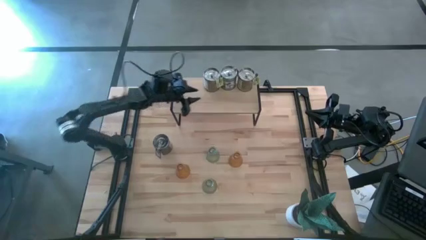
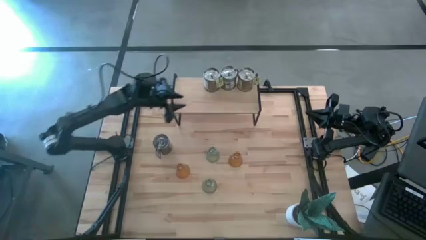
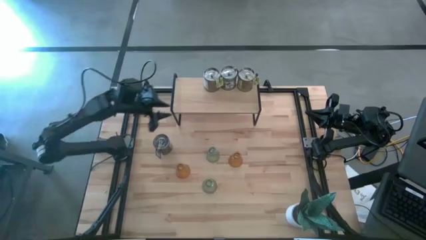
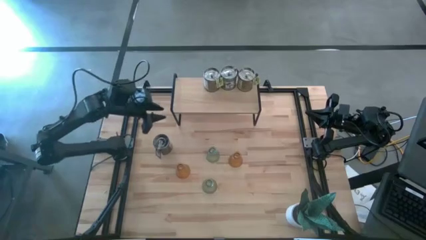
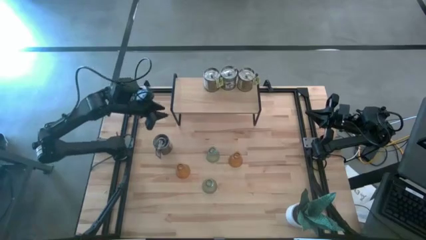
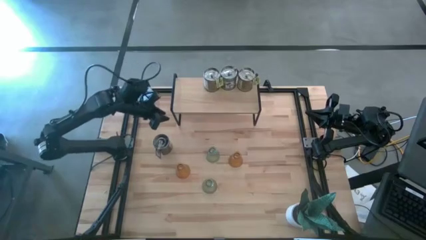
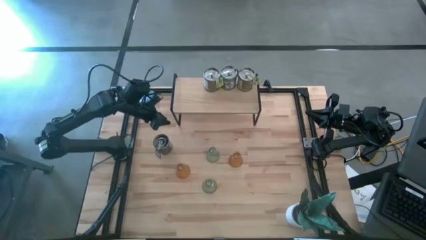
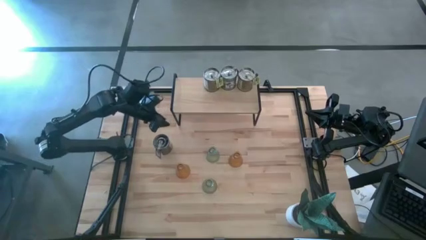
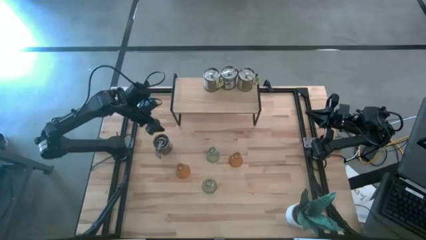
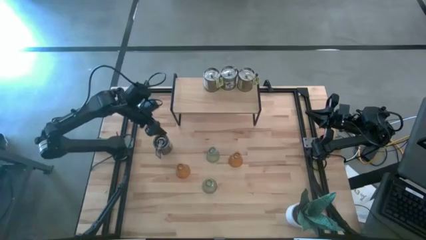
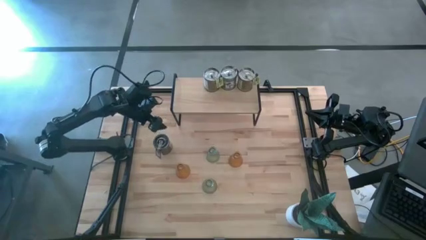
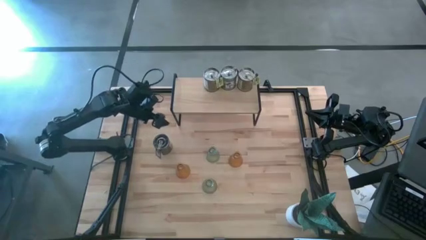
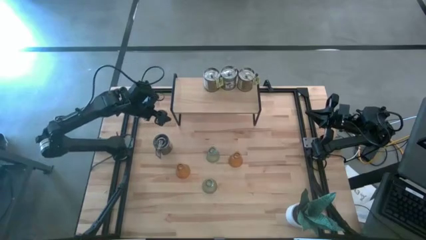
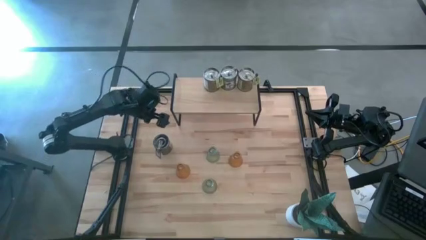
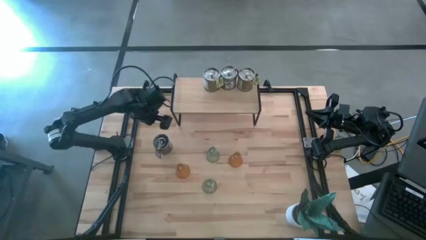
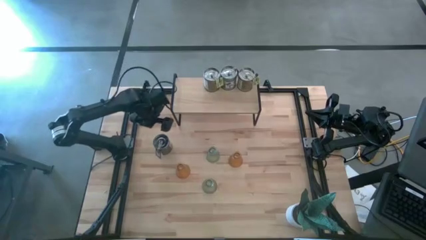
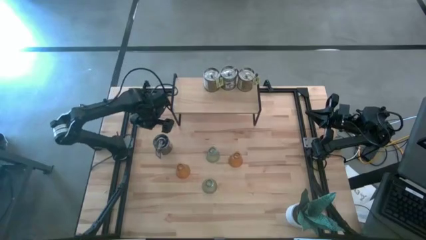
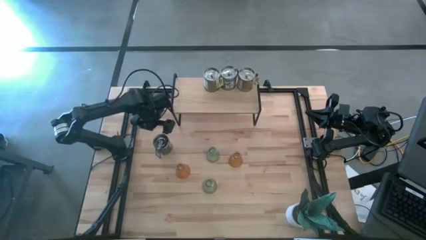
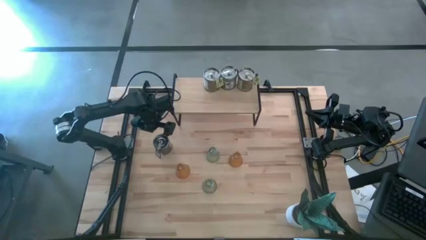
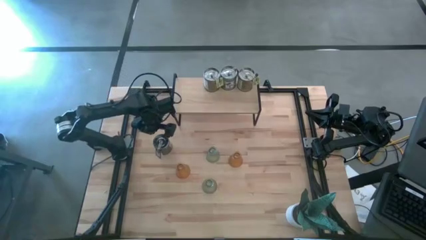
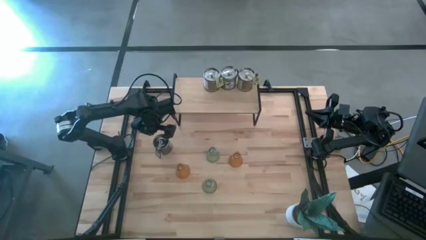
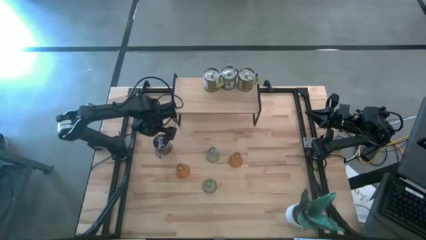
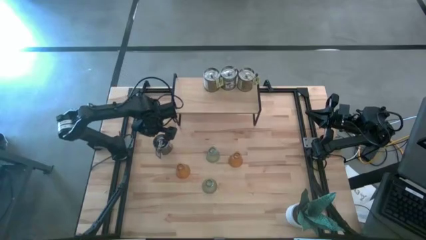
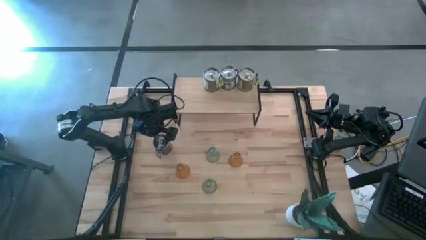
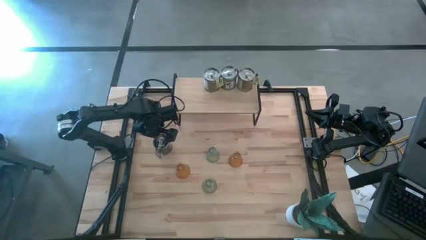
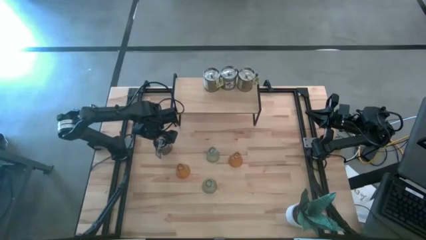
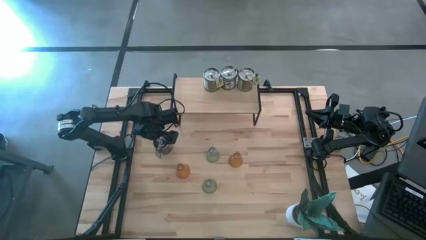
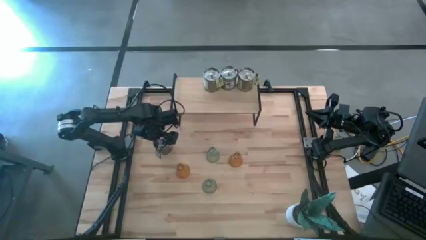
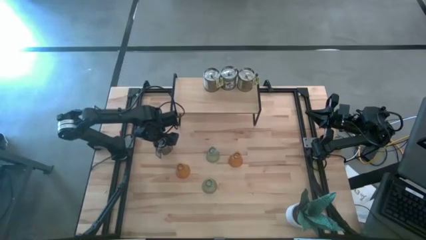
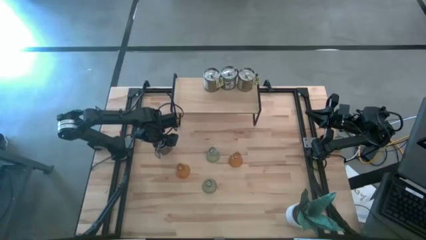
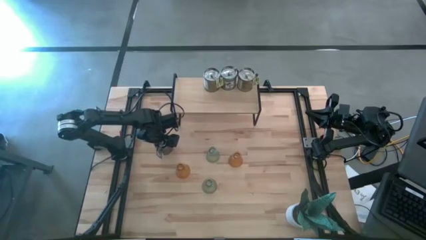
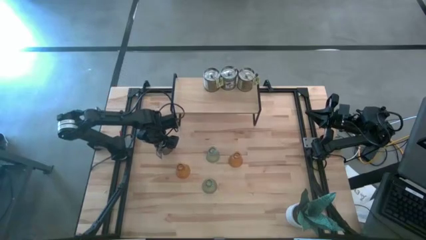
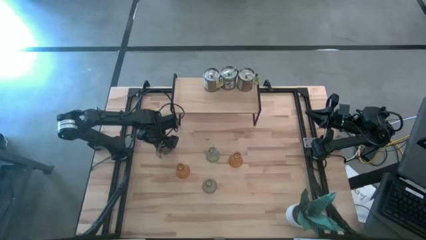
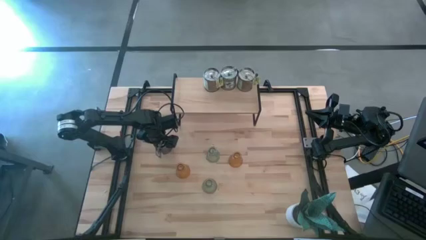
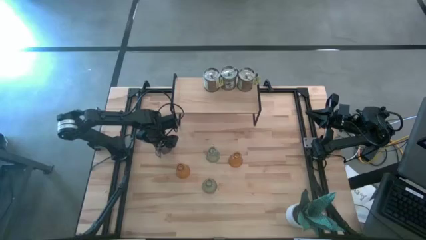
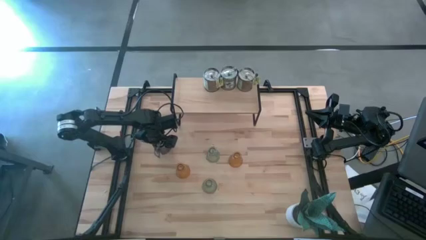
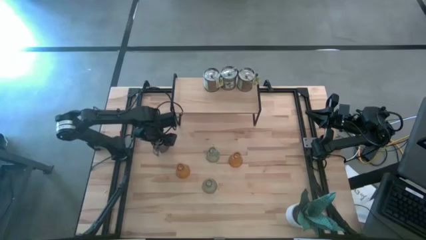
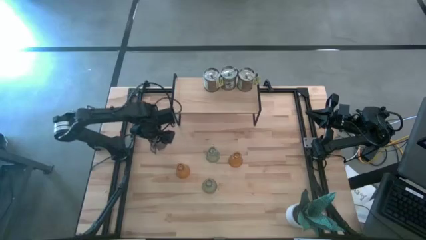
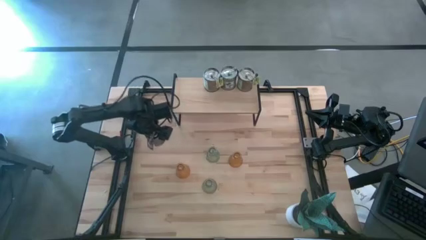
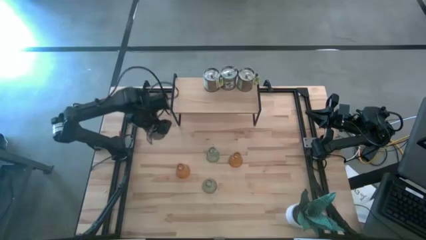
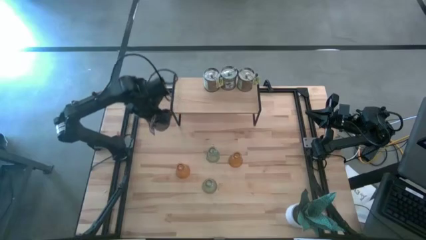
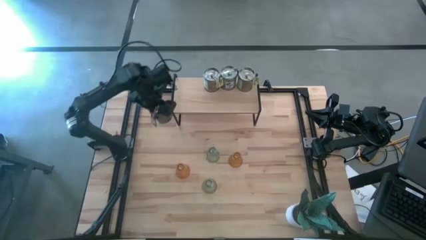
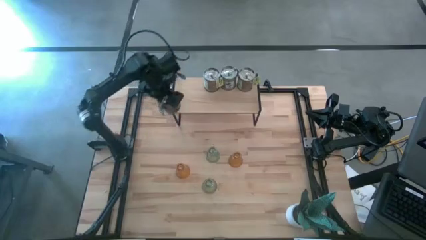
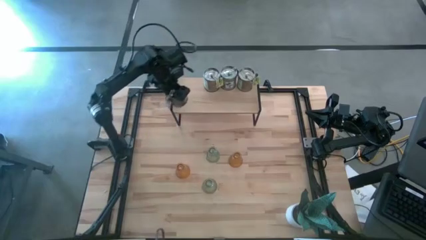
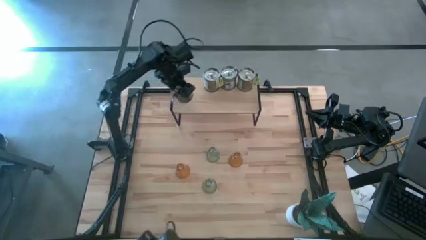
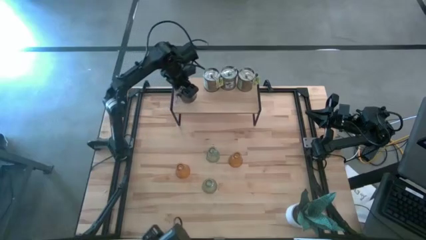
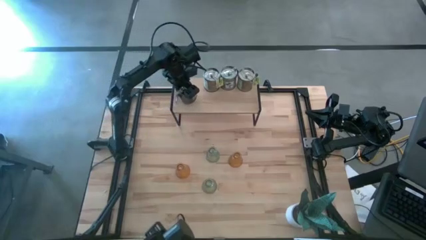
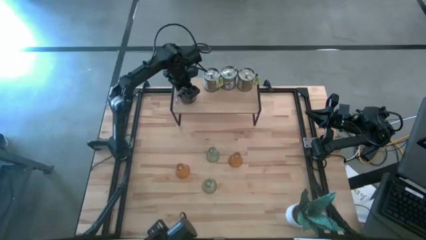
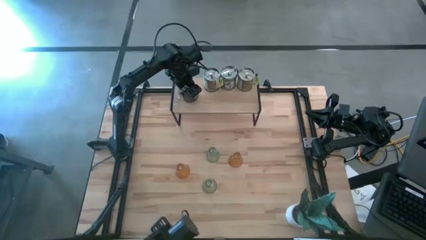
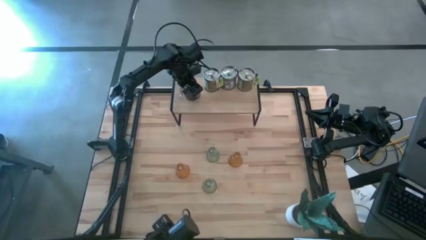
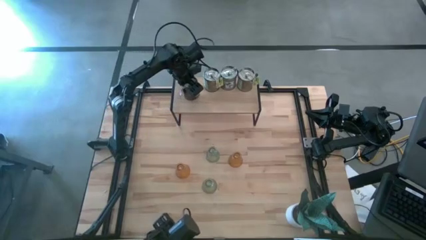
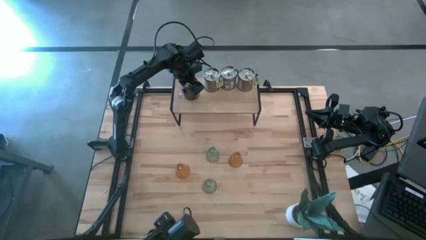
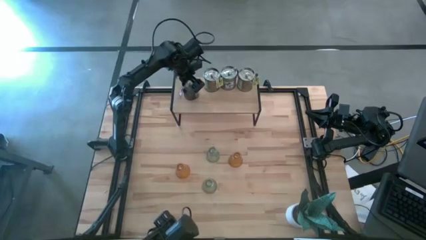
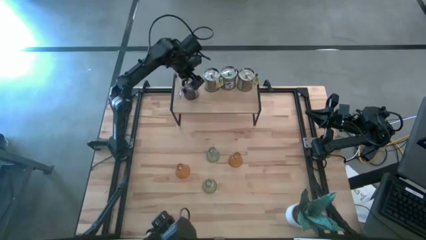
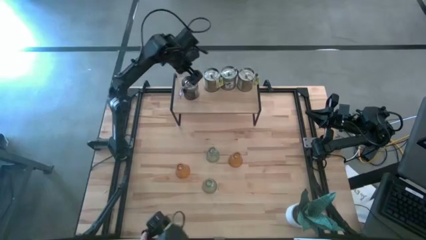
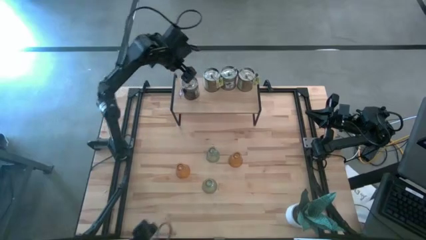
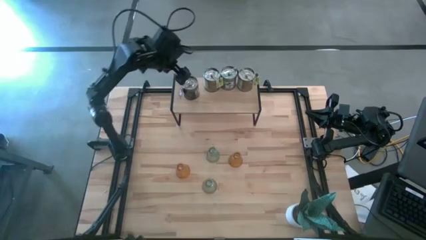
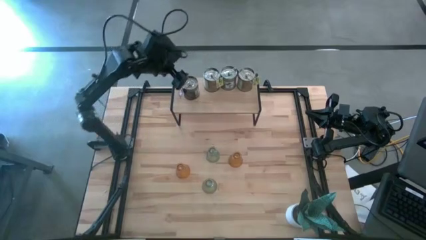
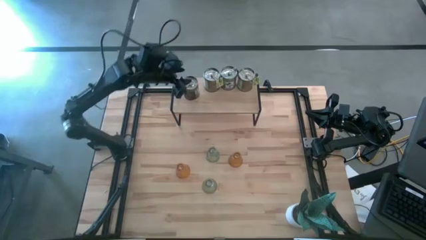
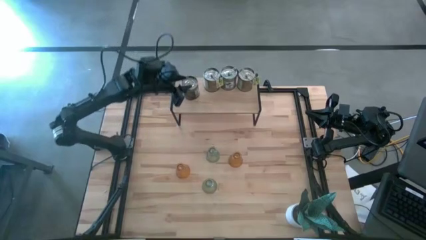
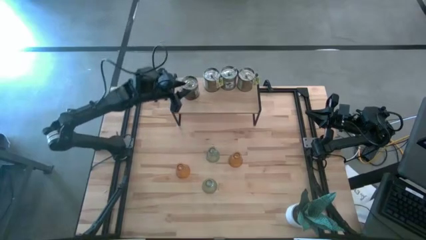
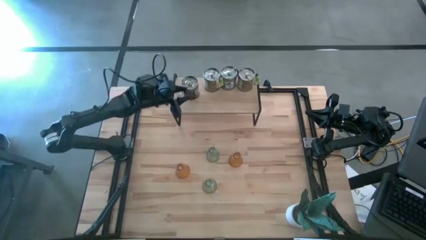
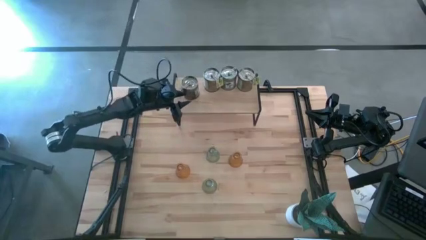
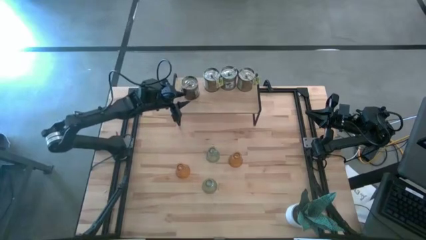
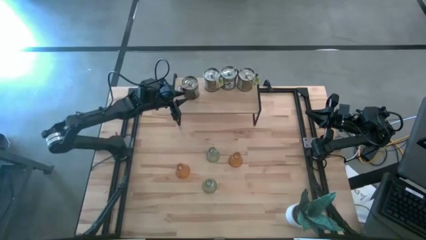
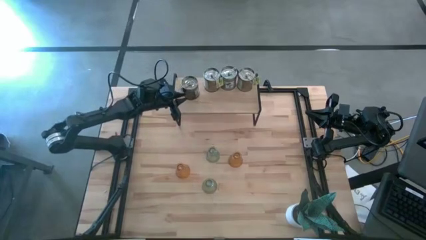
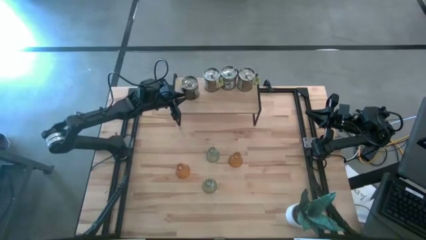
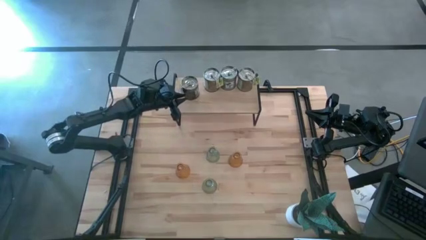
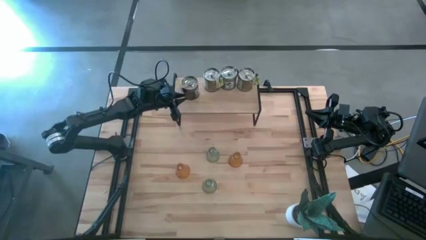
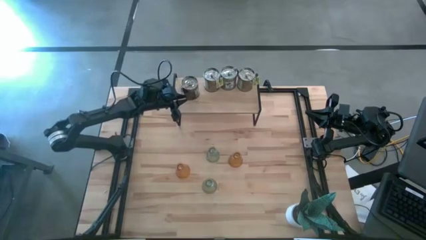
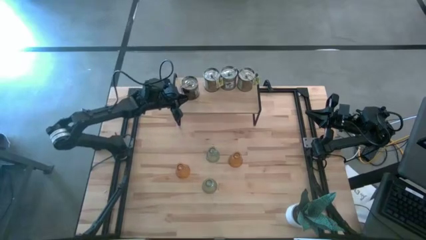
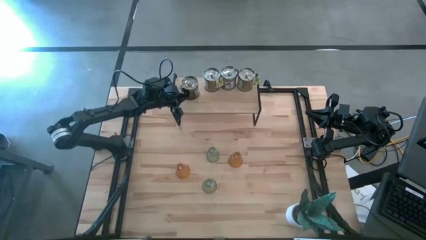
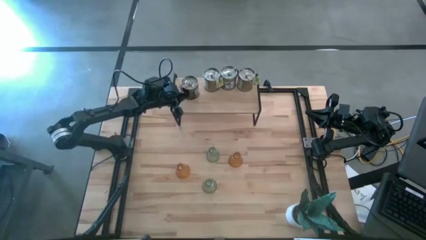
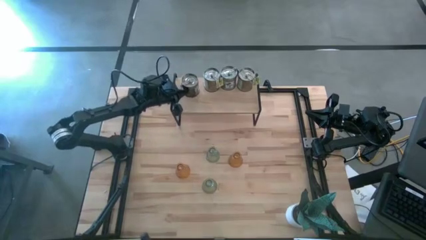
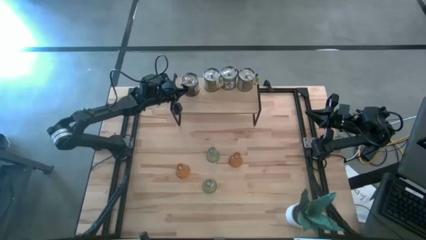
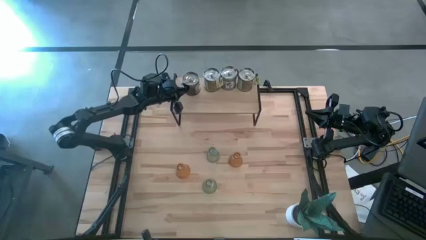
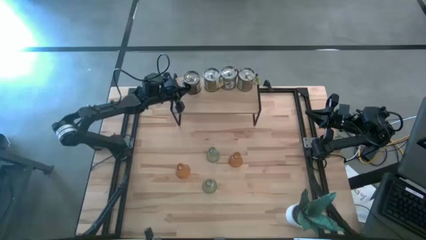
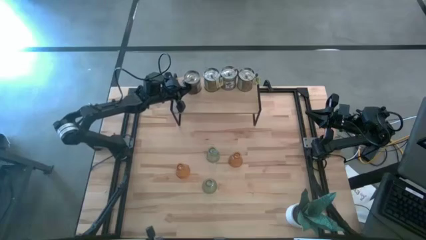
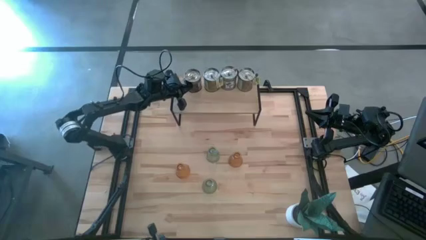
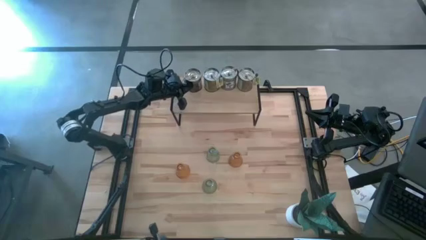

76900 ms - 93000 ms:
Task: Pick & Place candle stick holders
Put the silver scented candle on the shelf
